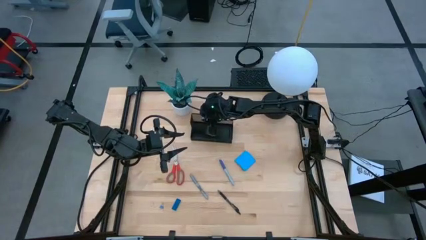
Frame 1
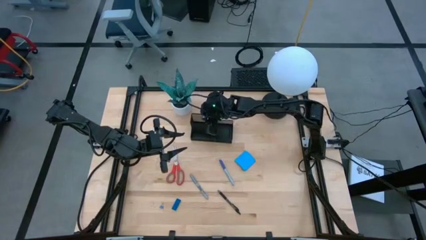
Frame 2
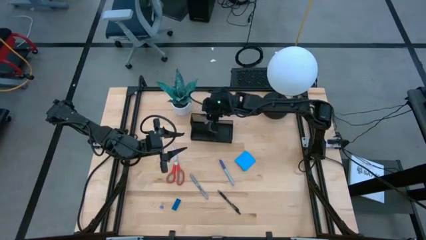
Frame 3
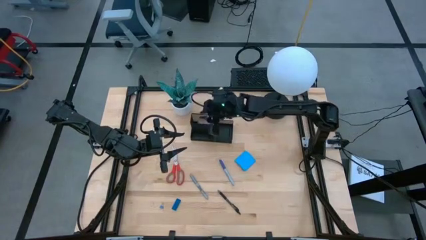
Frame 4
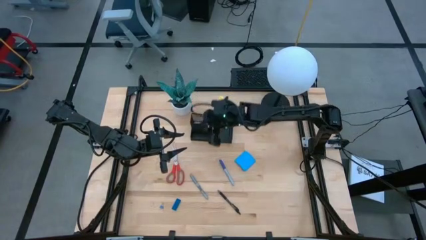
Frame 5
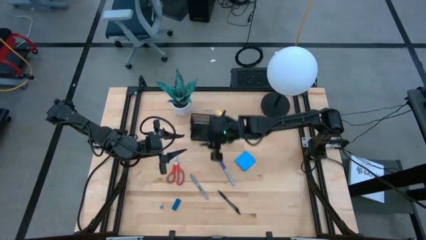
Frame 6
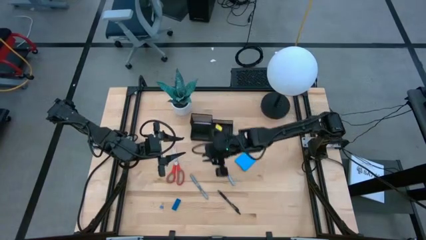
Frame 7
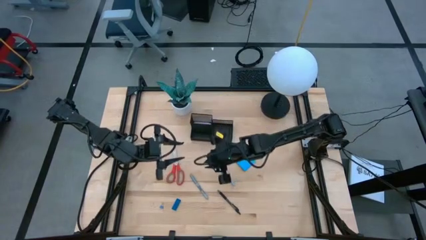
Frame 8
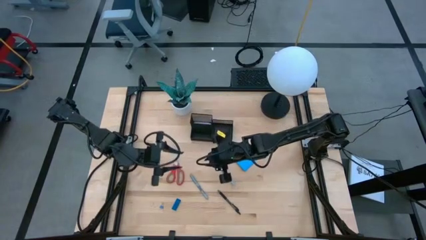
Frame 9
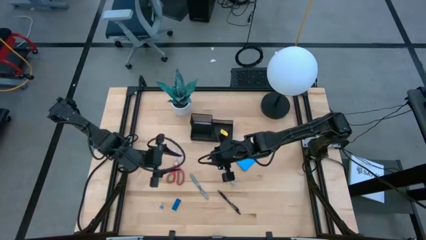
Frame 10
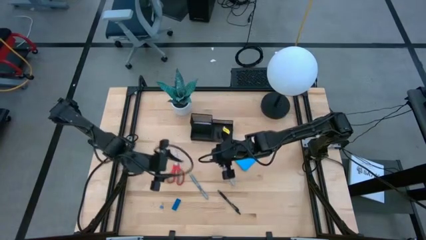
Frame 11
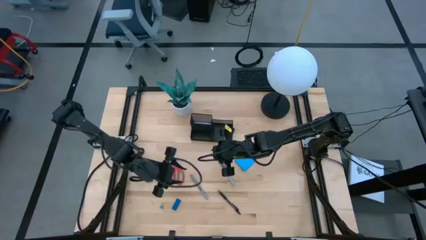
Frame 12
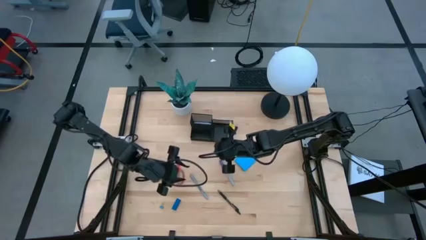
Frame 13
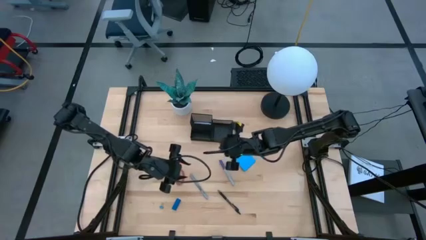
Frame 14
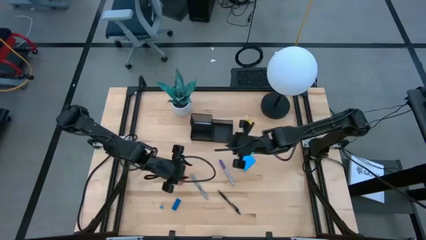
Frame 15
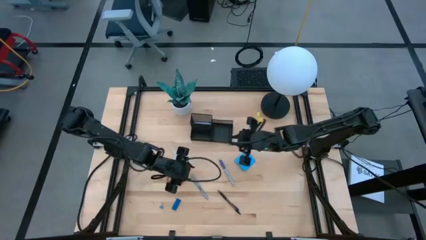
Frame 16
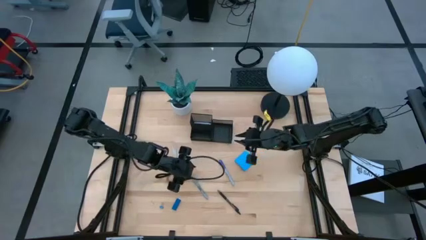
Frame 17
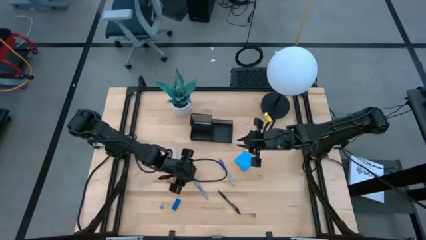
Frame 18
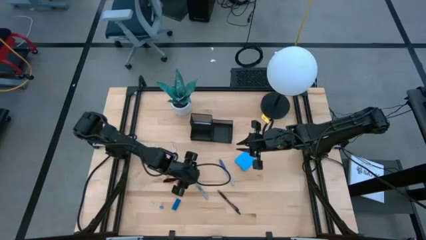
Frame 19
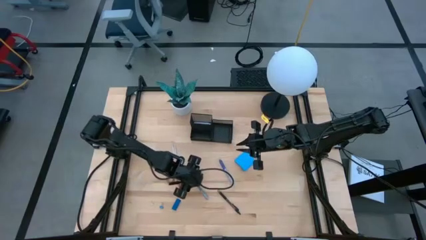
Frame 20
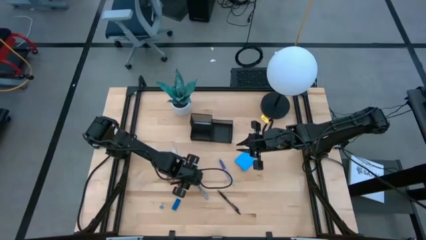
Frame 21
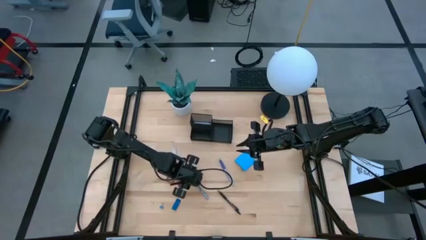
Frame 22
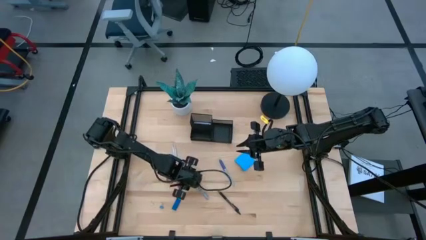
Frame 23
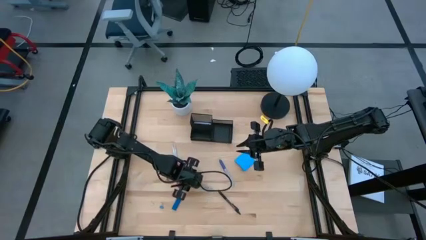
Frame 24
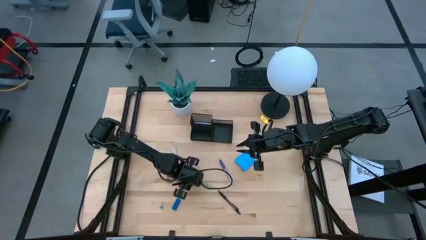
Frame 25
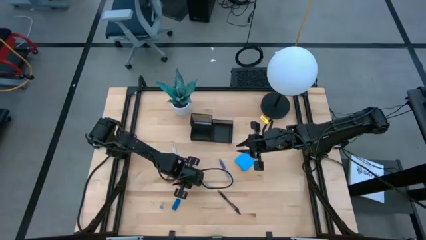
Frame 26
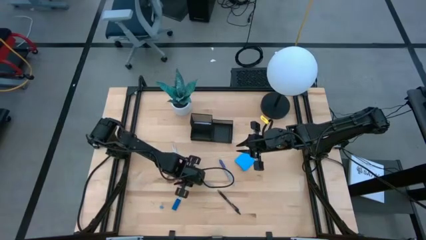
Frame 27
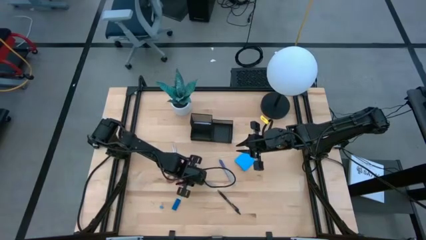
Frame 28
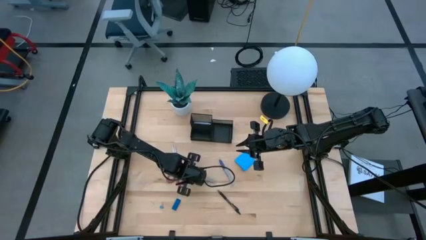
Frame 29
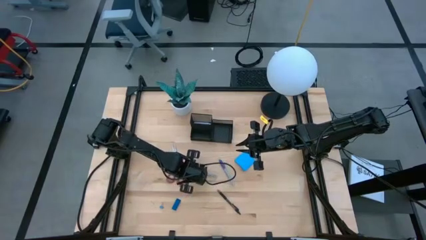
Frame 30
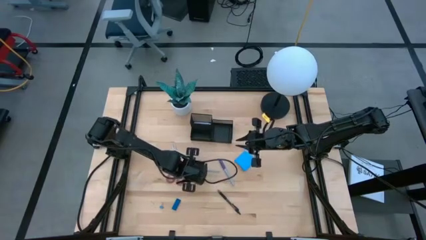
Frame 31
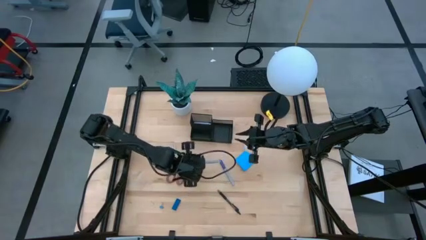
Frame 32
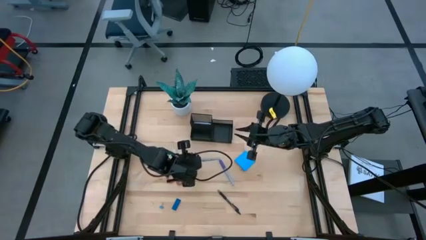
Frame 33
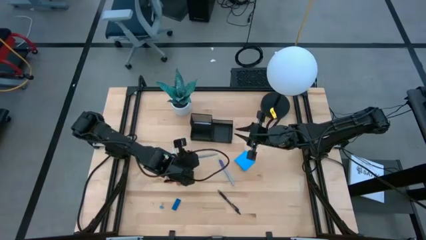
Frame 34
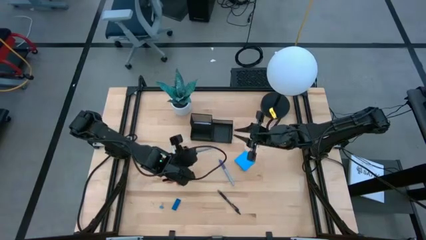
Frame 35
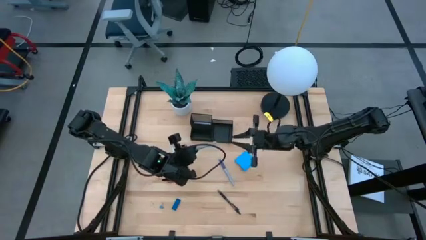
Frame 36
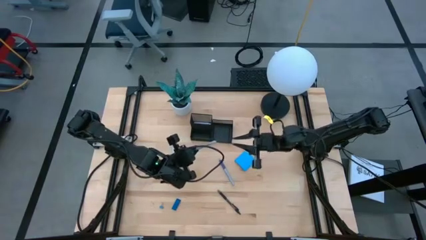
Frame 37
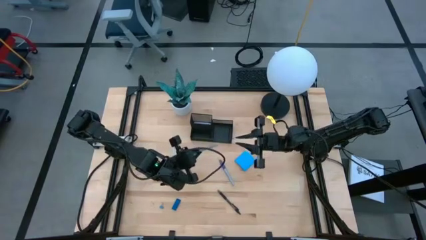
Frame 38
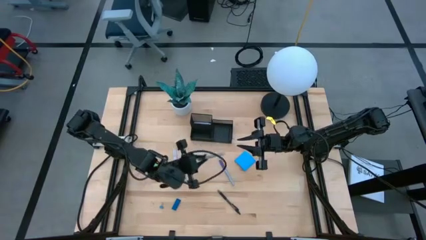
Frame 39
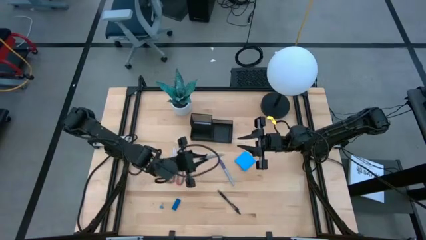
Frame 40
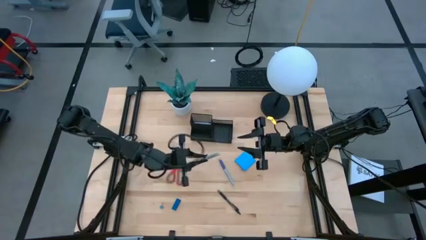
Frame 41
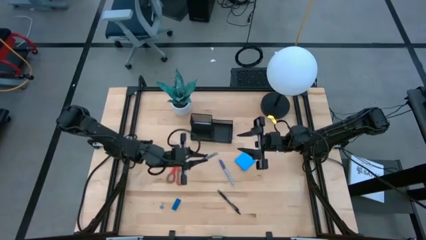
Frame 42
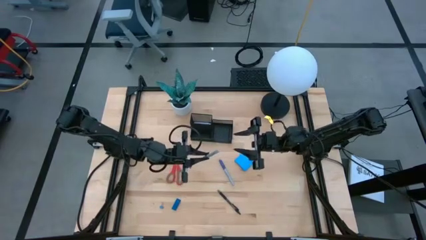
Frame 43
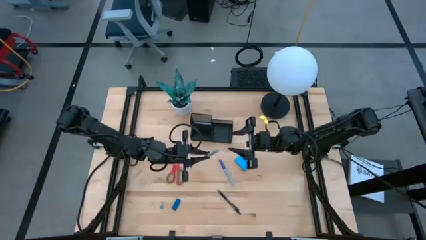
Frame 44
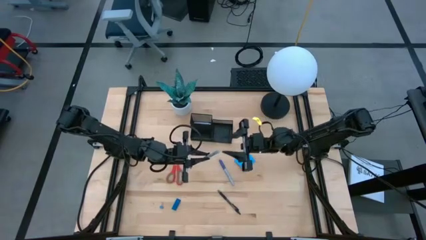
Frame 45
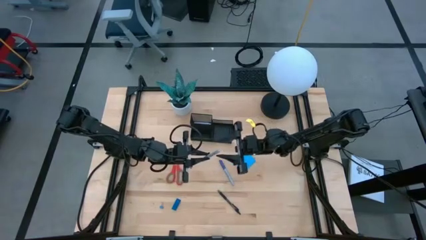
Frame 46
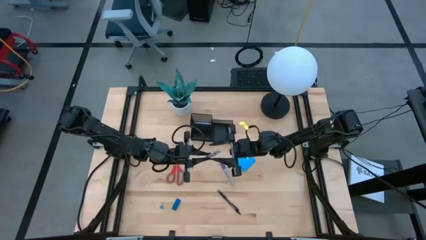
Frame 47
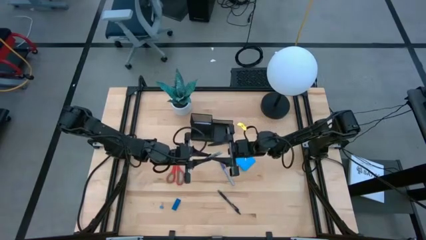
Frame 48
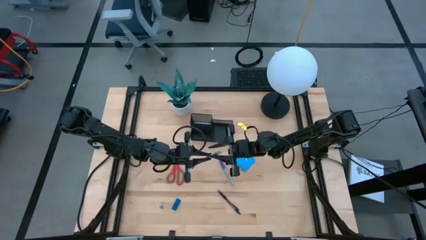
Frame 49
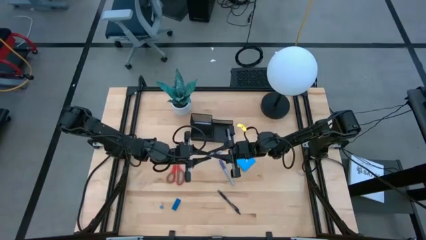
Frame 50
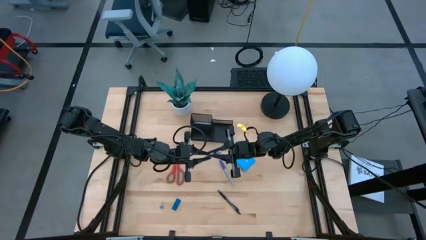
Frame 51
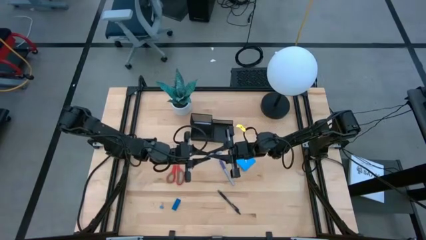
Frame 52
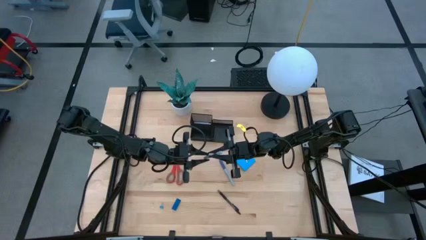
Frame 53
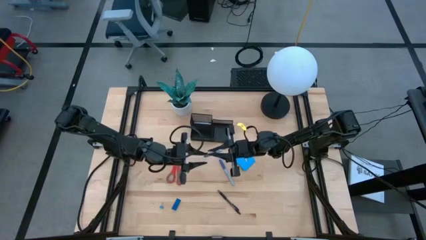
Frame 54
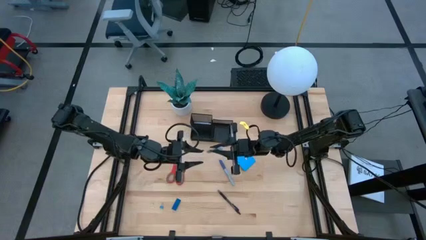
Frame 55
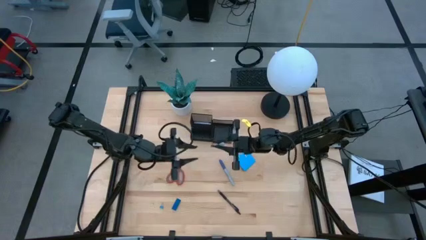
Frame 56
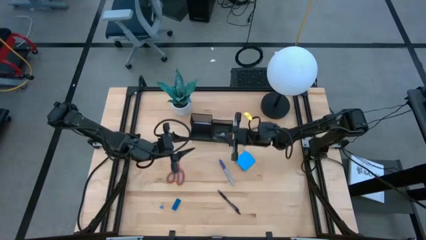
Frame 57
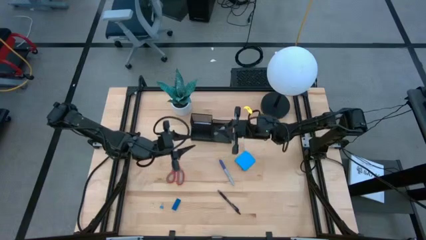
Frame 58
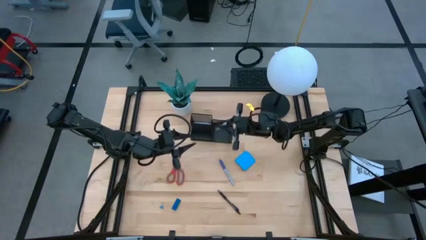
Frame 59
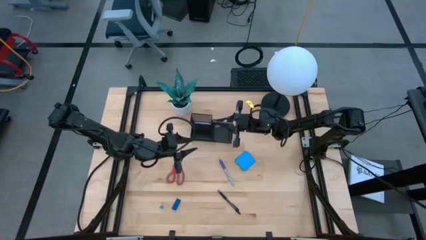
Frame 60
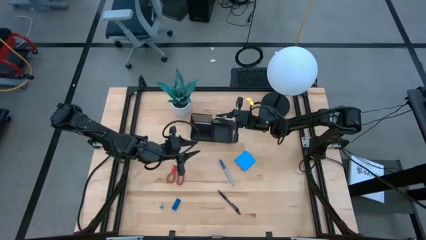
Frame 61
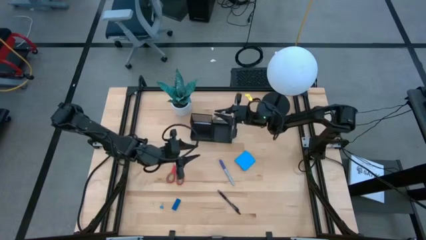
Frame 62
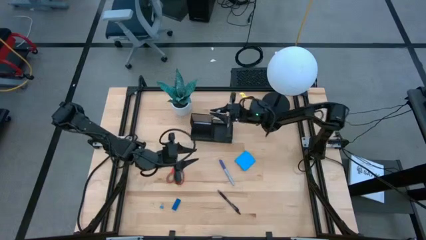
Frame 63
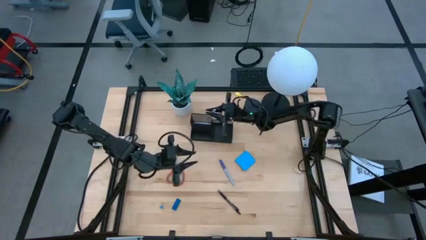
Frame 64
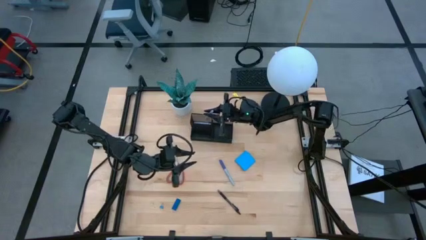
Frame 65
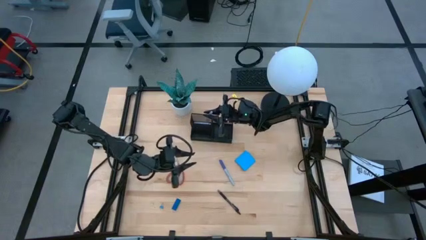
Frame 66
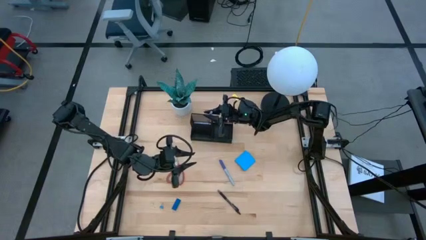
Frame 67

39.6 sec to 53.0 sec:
Task: Pick and place office supplies into organizer
Put the gray marker into the black desk organizer

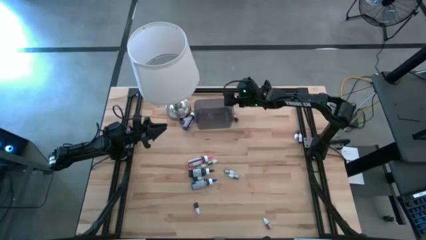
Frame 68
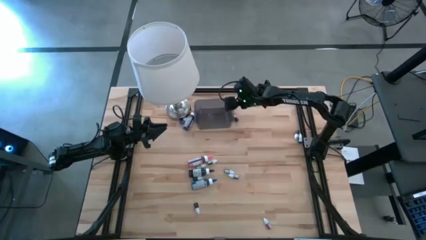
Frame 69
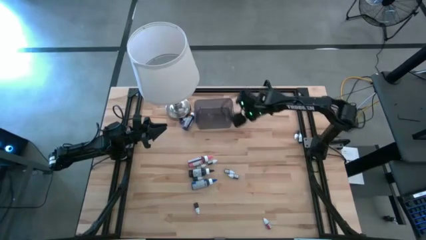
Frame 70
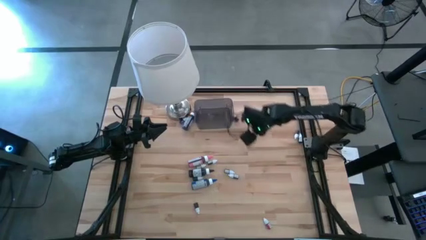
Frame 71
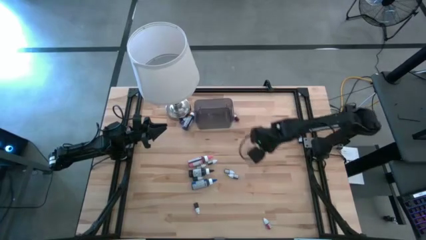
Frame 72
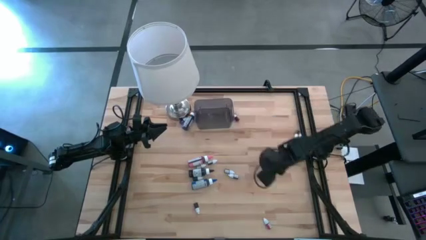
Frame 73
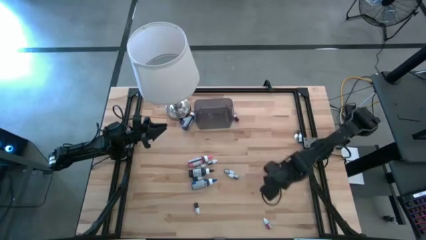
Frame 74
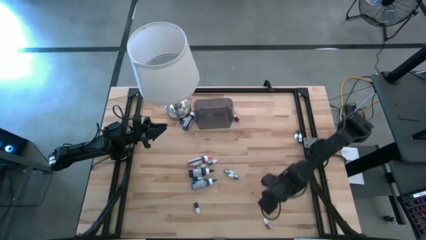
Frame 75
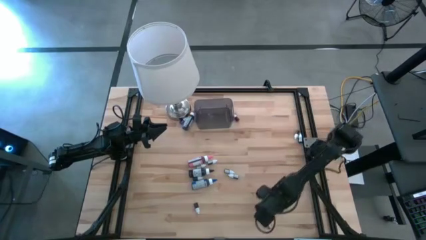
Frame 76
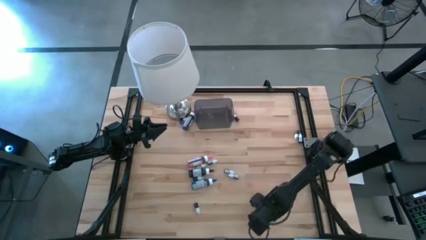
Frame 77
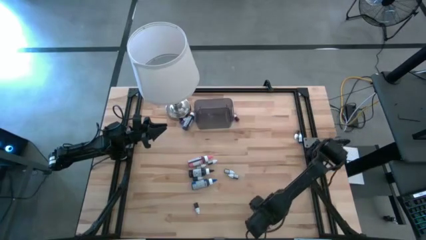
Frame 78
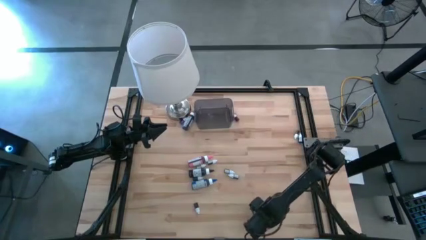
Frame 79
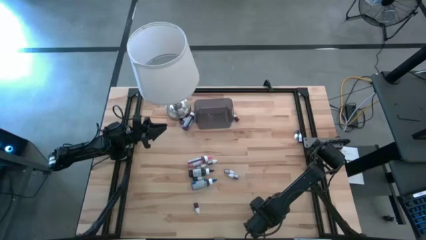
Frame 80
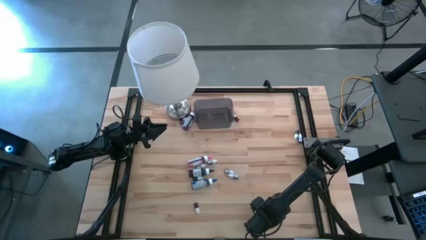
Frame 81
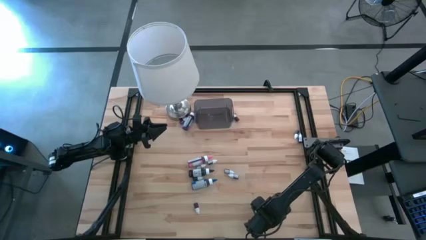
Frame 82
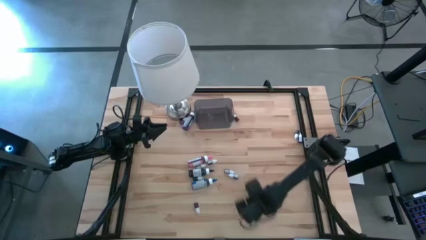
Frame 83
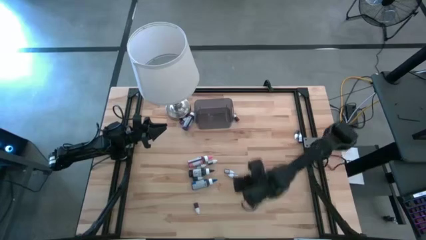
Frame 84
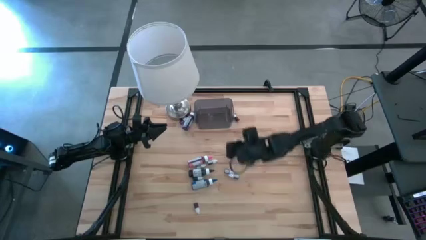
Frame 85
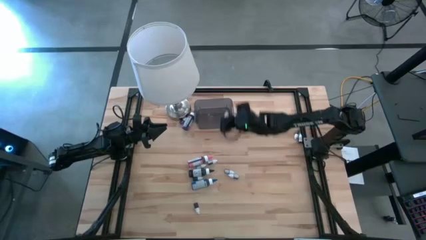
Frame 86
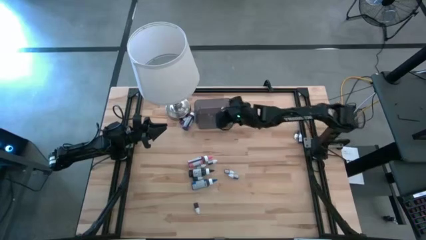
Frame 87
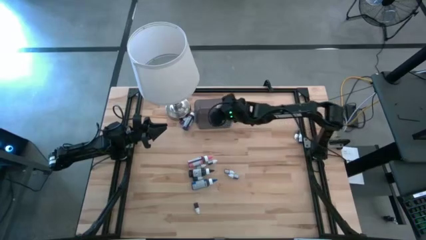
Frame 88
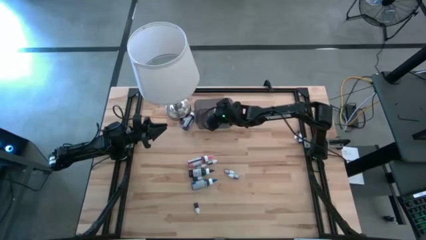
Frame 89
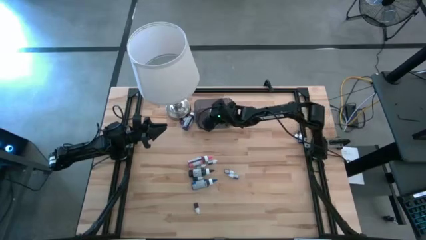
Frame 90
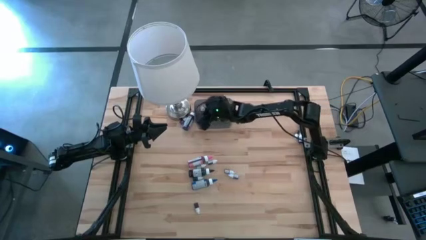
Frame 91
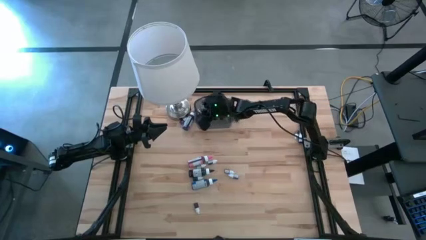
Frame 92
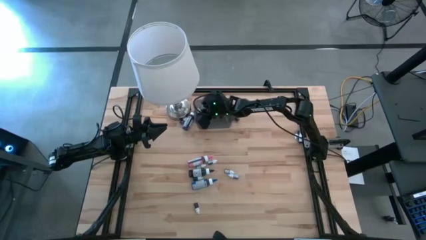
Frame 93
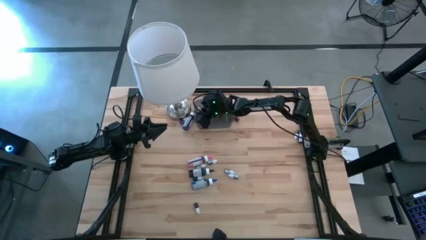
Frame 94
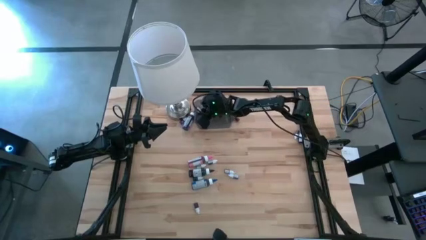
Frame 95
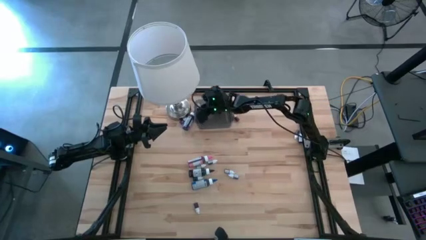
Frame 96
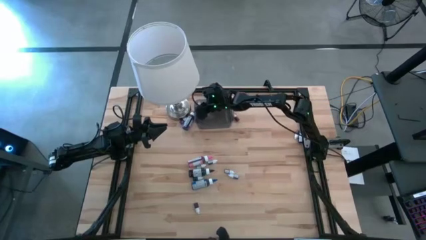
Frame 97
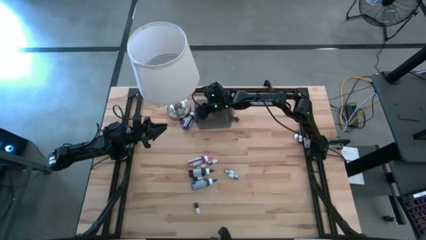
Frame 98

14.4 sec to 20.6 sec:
Task: Pick & Place food coloring
Put the right small red food coloring bottle into the bin
